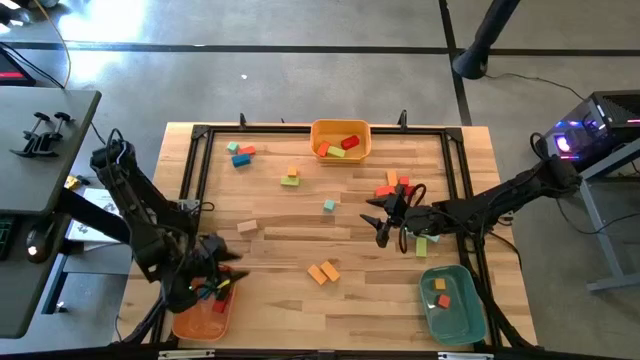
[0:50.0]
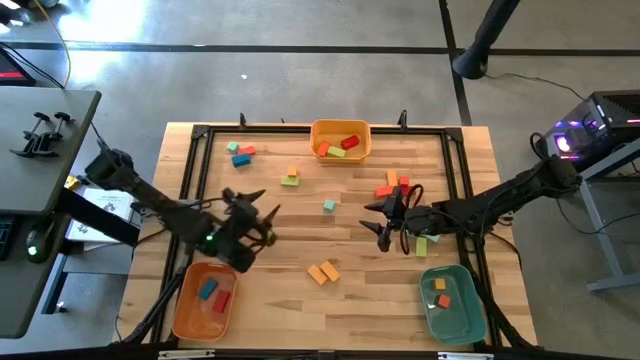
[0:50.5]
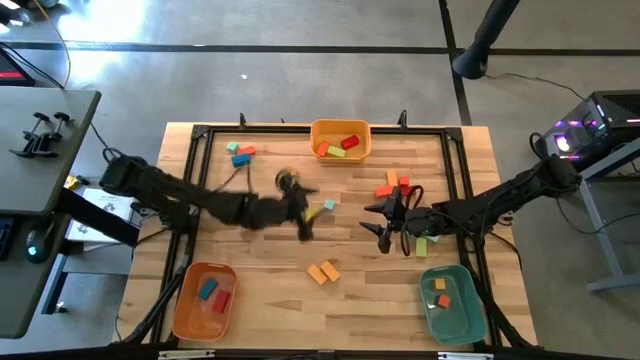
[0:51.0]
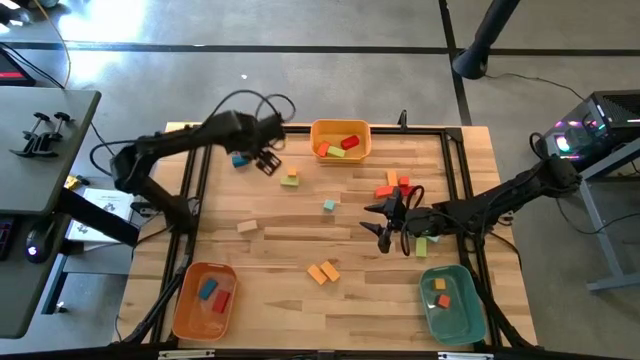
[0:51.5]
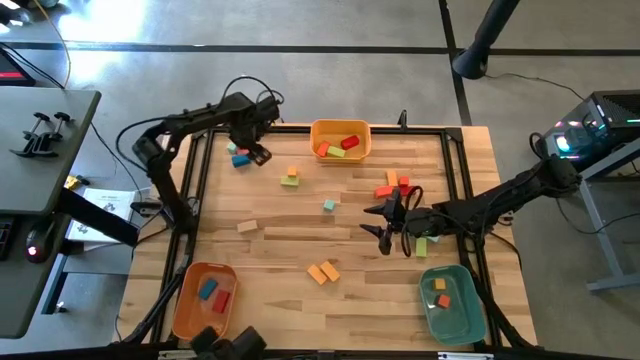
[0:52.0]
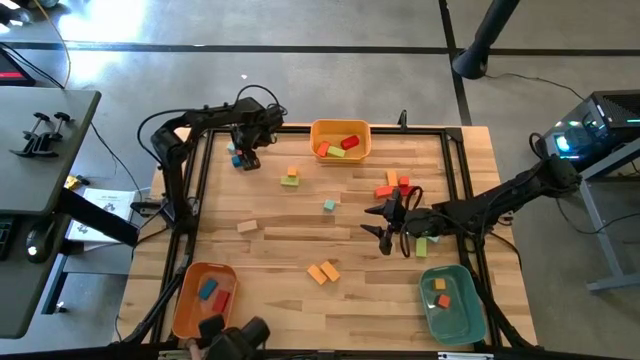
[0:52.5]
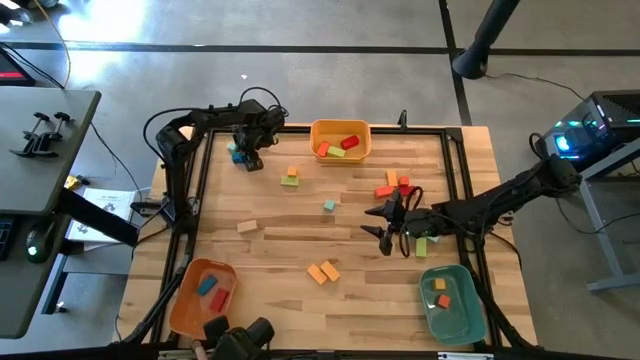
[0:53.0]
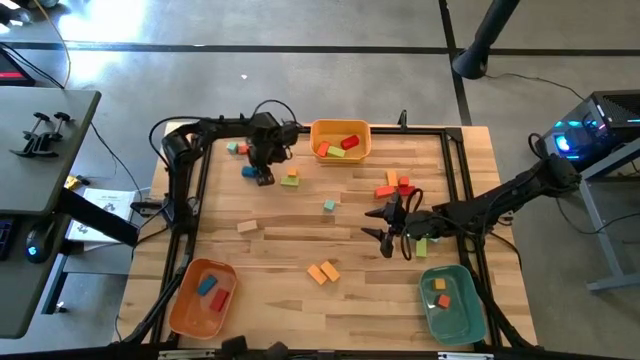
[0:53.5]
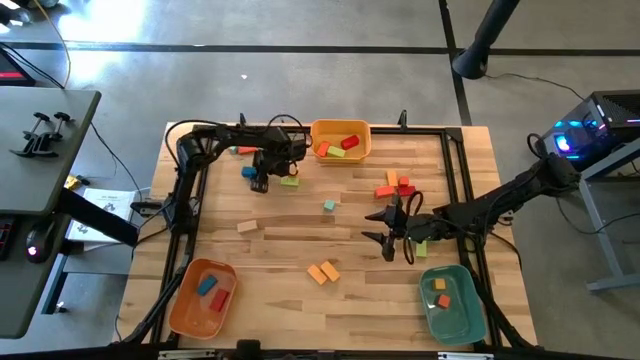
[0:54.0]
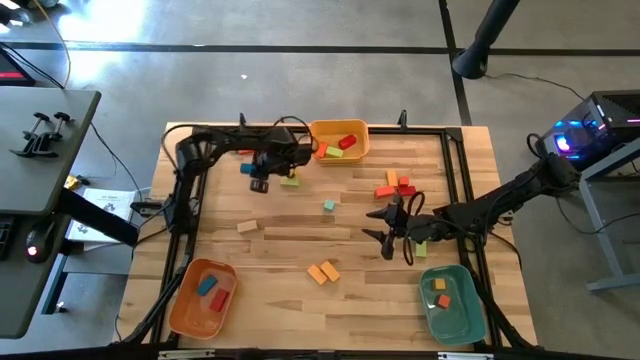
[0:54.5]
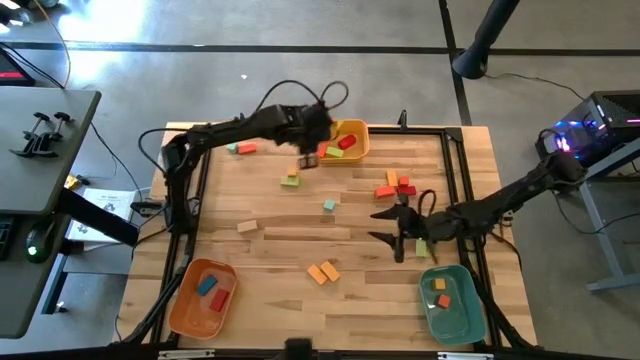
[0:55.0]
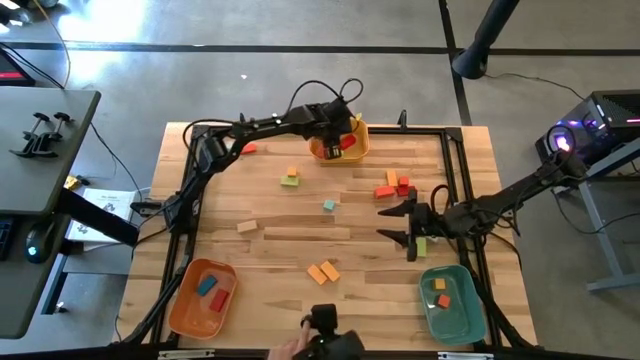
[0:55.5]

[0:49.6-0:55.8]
Task: Sort blocks by size
Put the blue wide rectangular block into the yellow bin

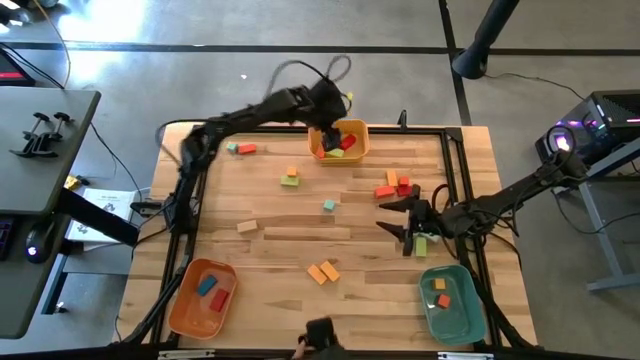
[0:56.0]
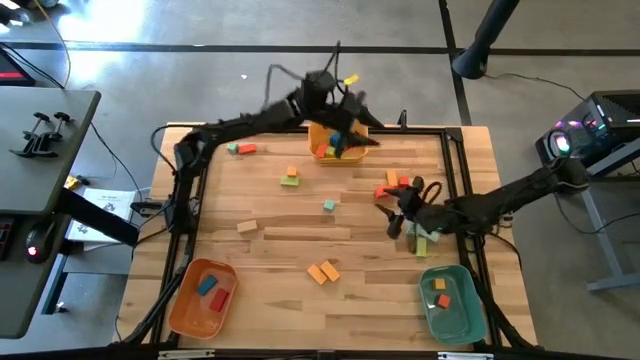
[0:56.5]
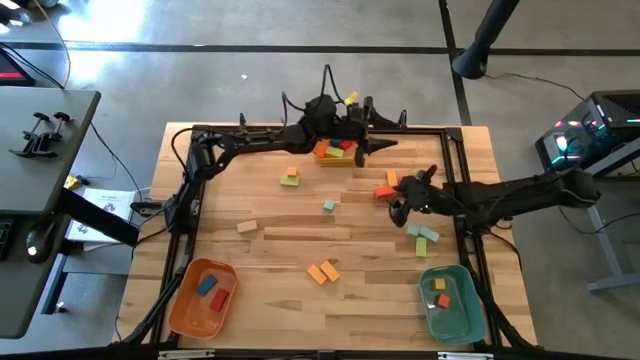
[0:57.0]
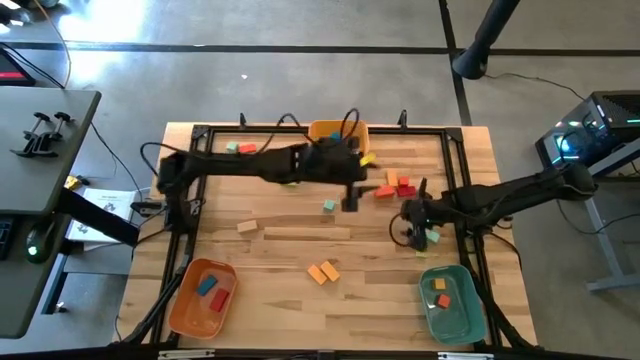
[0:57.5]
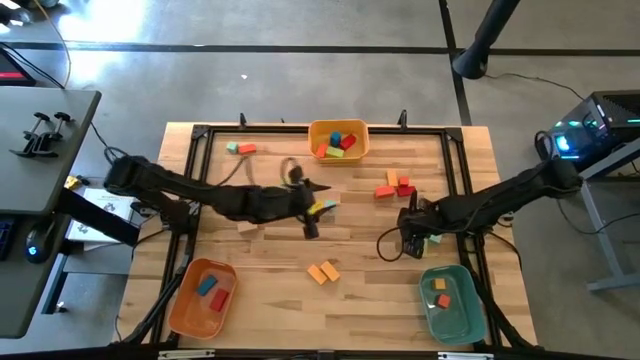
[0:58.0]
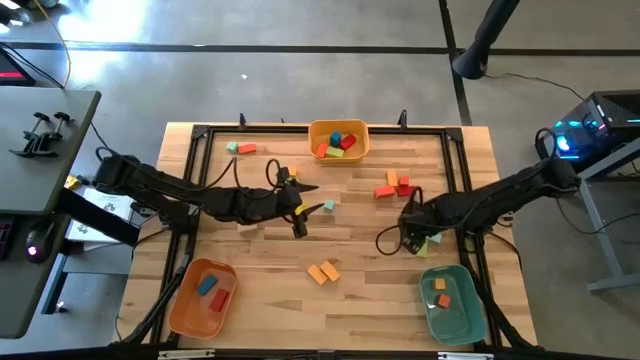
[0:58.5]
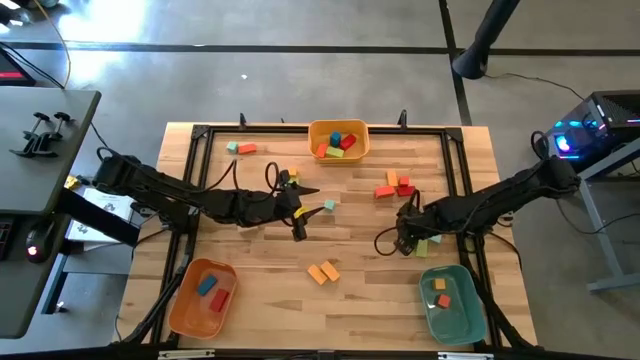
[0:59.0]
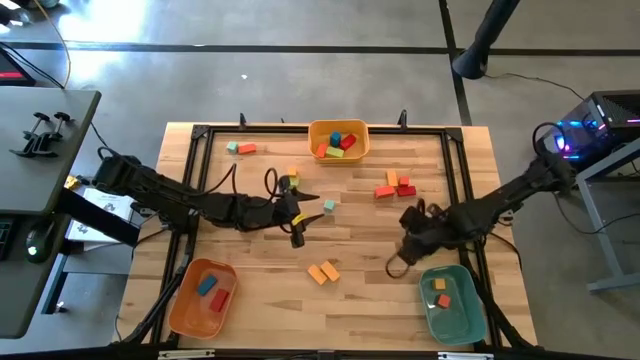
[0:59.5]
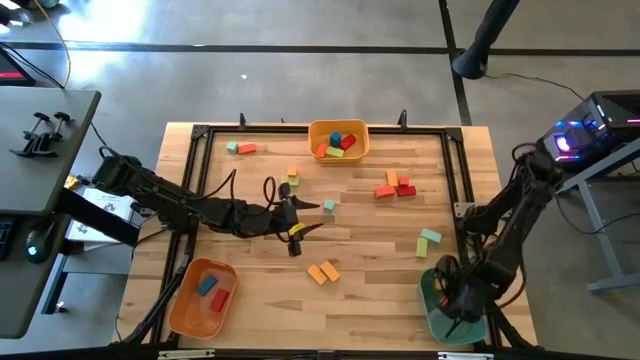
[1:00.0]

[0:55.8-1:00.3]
Put the bottom blue square block into the blue bin

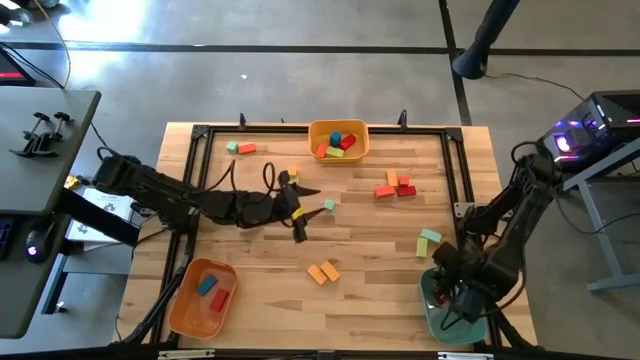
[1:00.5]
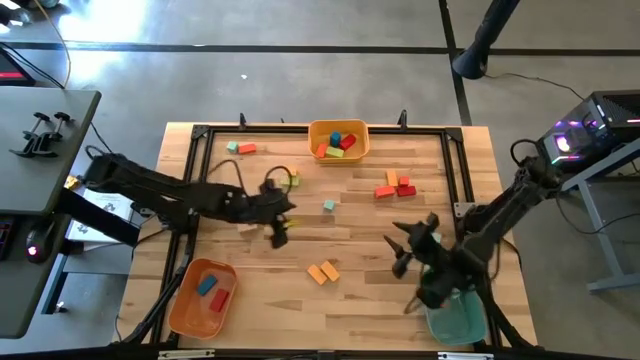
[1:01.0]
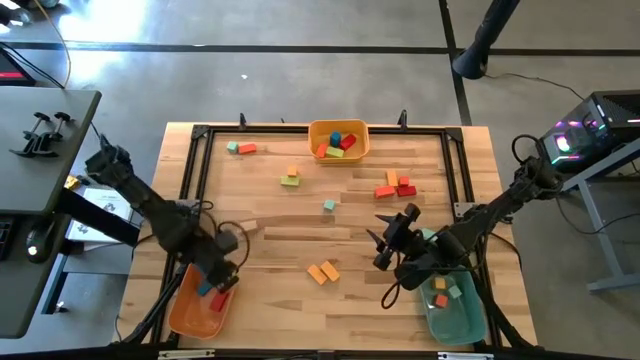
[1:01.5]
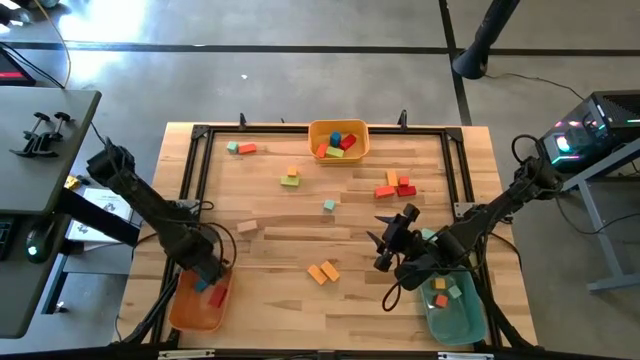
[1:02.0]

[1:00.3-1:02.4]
Adjust the orange bin

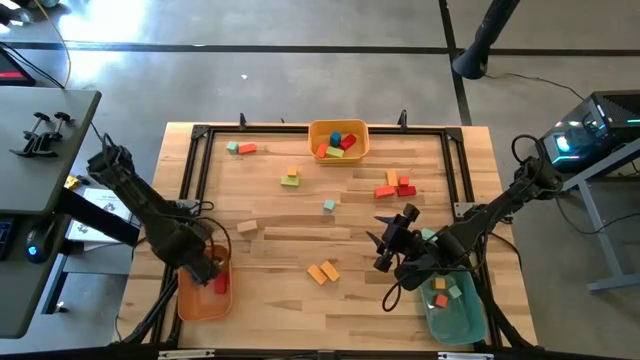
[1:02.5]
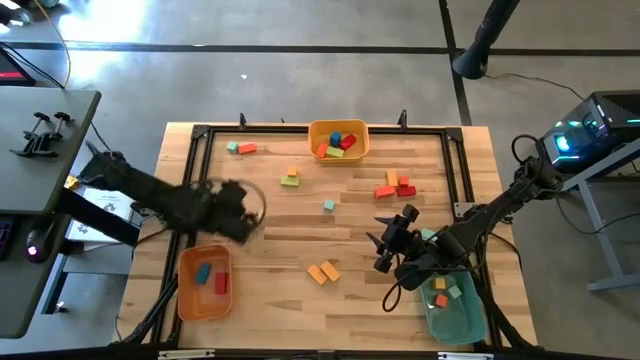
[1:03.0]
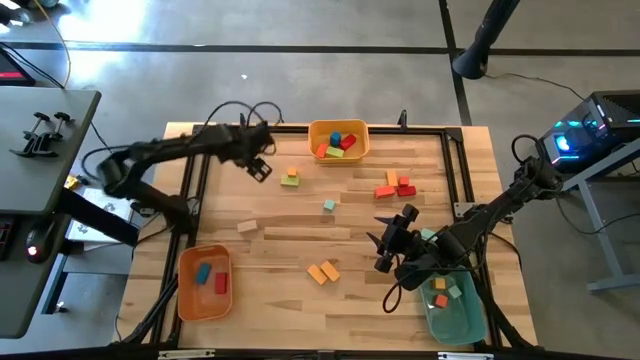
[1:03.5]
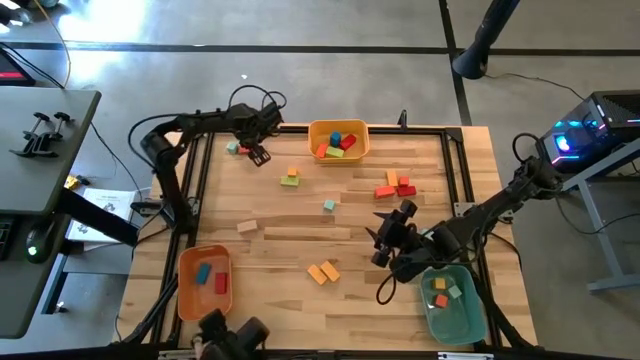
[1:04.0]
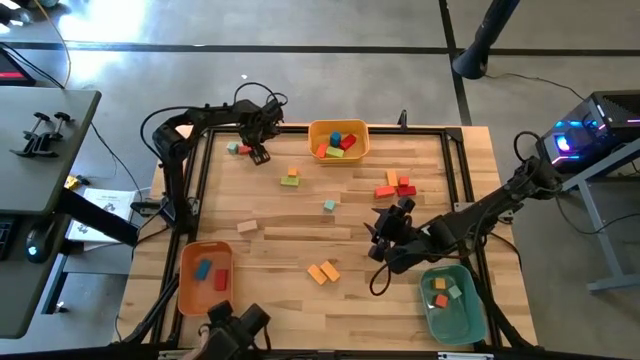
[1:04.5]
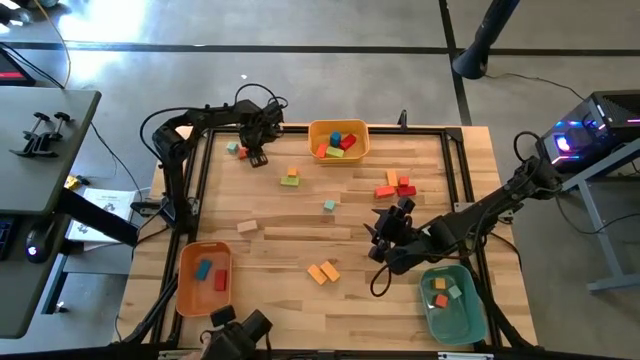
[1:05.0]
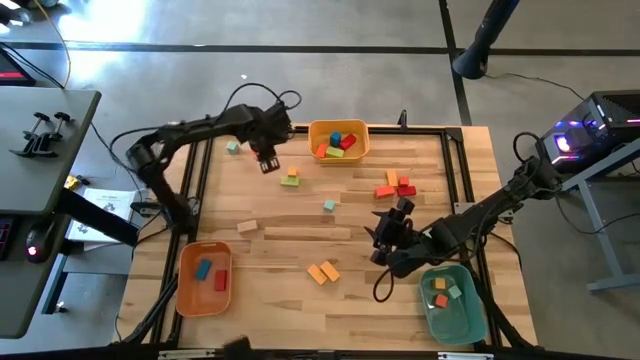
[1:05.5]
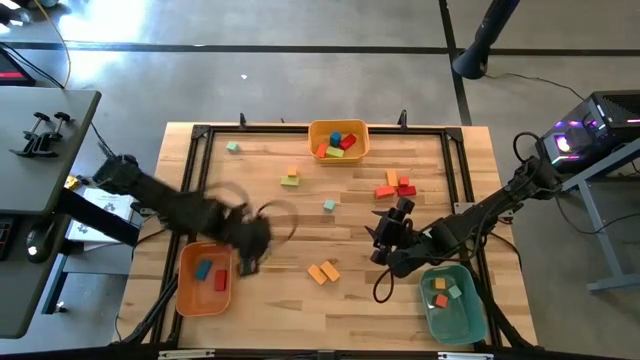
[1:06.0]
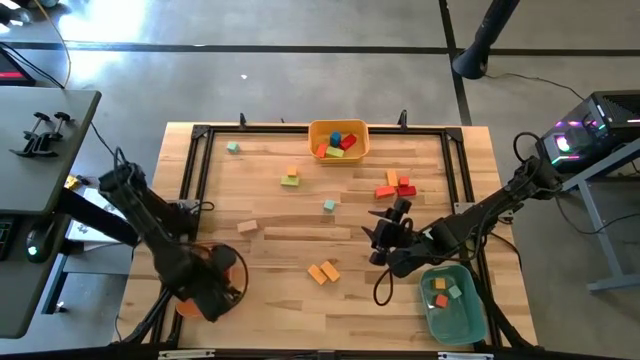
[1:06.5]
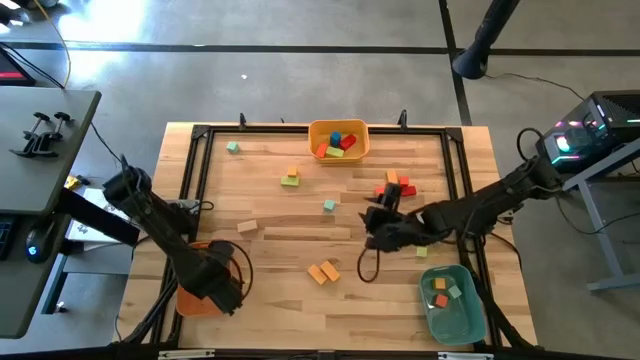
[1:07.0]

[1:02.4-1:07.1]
Put the orange narrow rectangular block into the orange bin

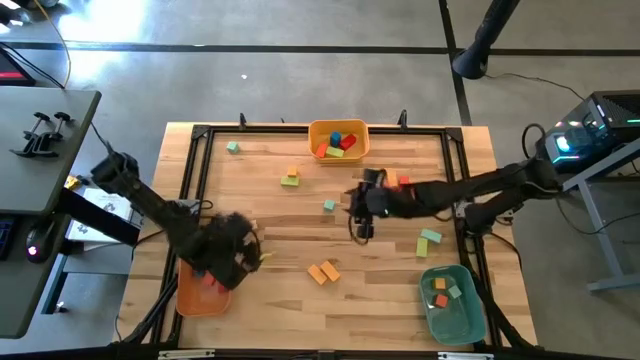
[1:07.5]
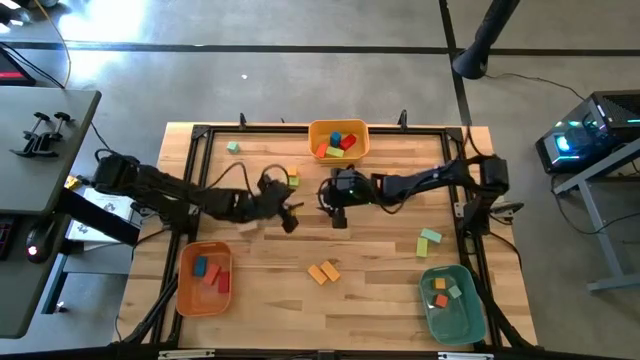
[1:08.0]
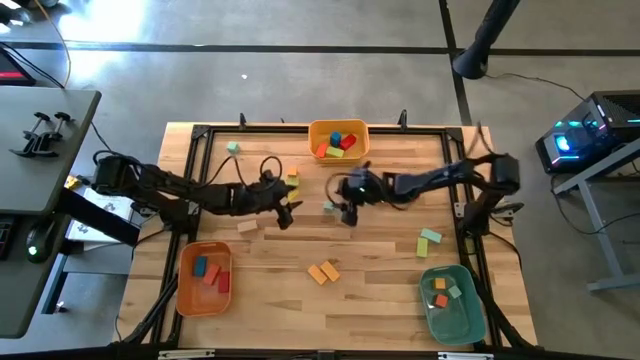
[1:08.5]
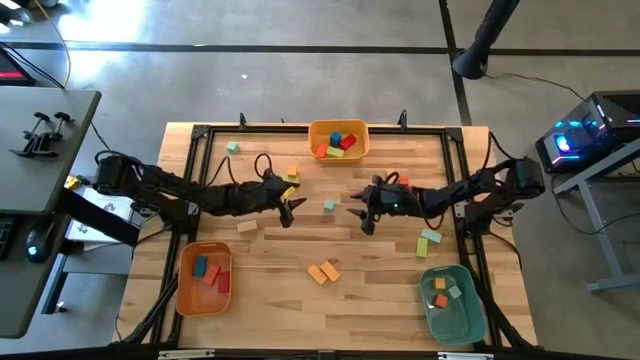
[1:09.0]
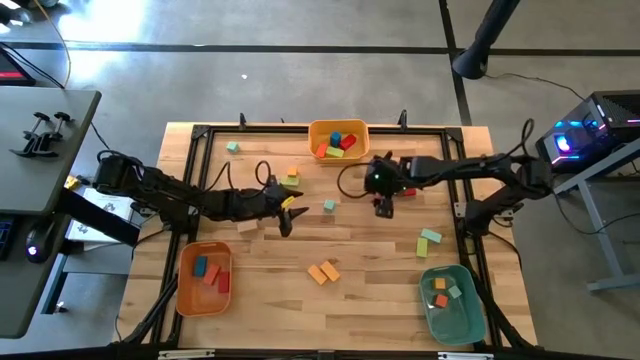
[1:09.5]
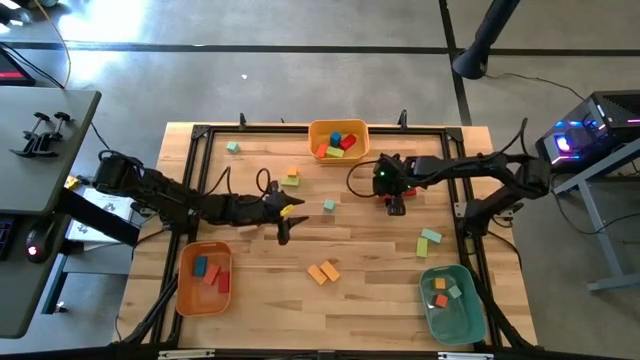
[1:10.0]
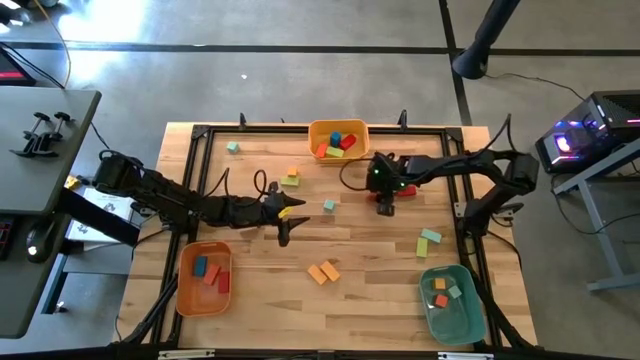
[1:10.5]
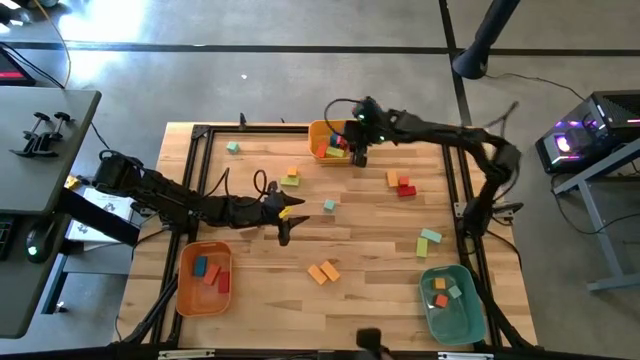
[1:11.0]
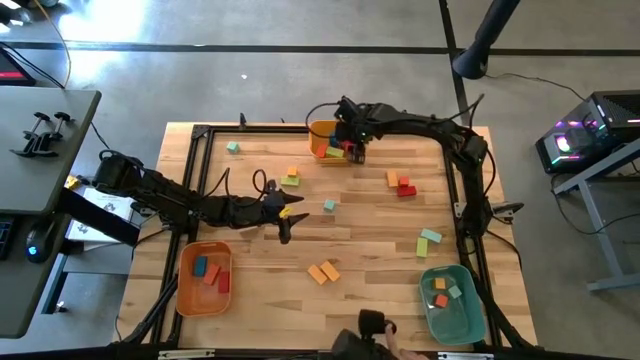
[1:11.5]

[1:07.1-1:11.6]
Put the orange wide rectangular block into the yellow bin

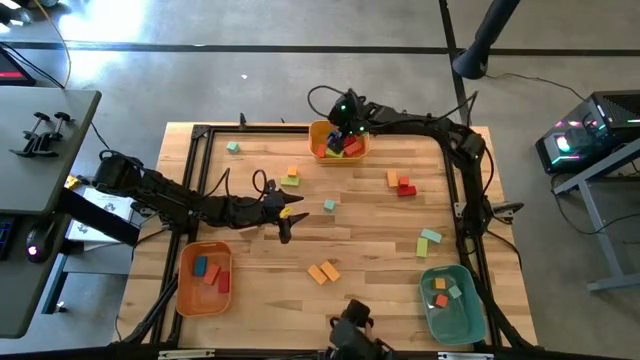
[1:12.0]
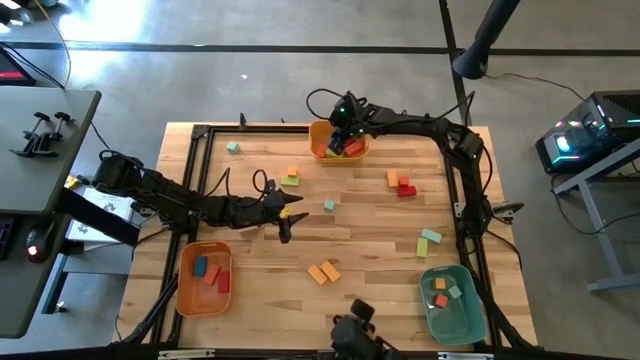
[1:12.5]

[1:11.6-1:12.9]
Adjust the blue wide rectangular block from the yellow bin
